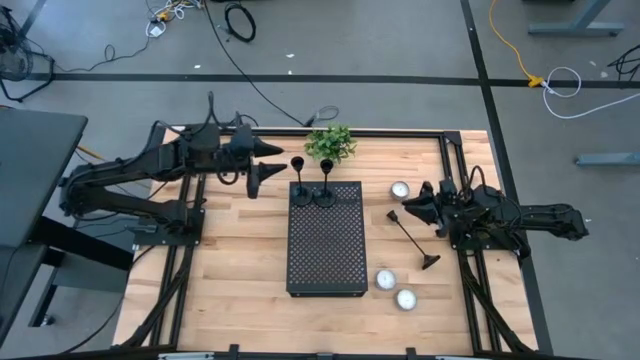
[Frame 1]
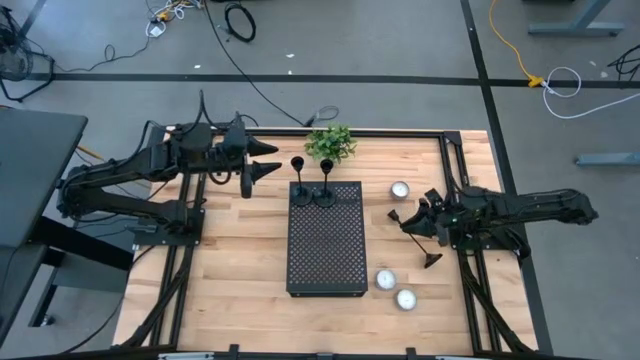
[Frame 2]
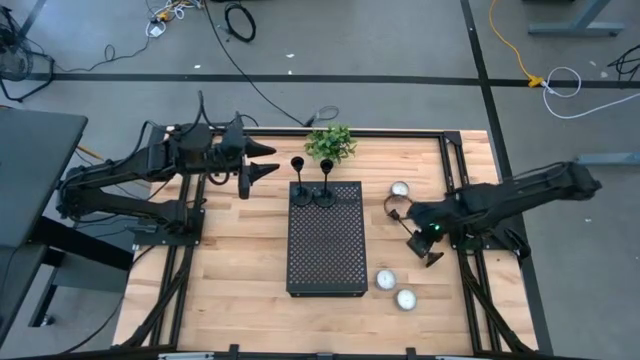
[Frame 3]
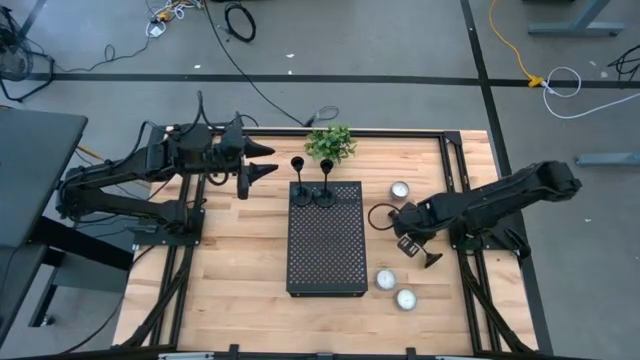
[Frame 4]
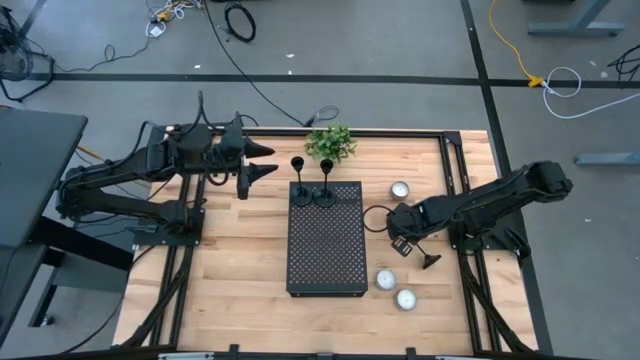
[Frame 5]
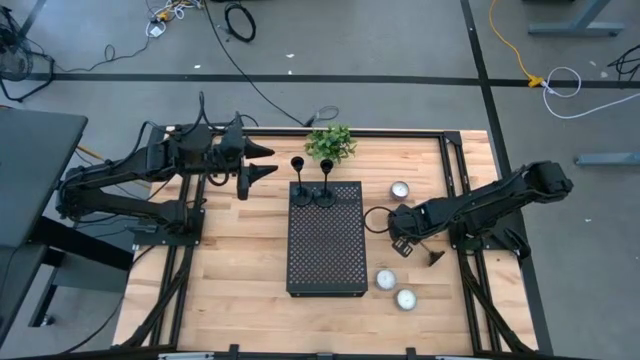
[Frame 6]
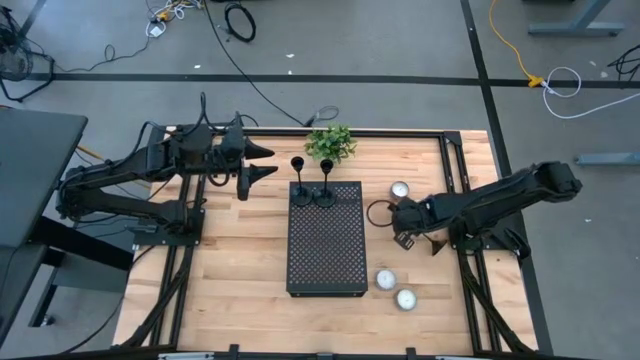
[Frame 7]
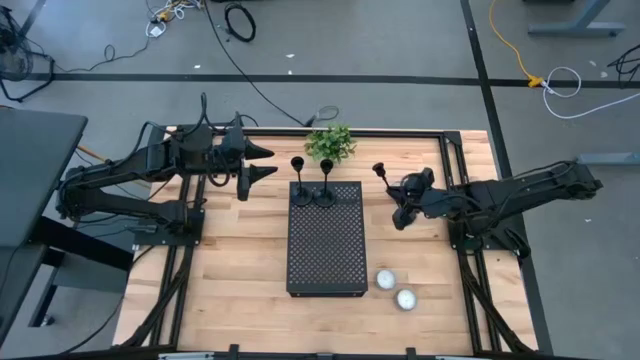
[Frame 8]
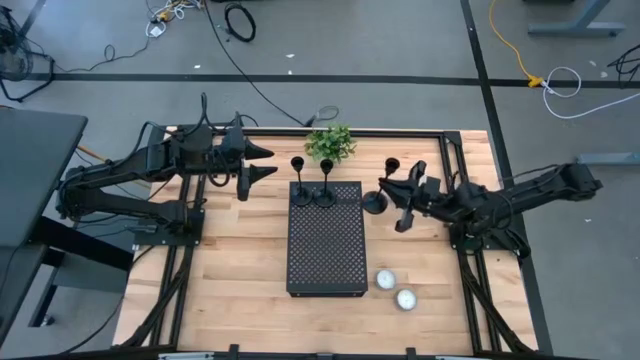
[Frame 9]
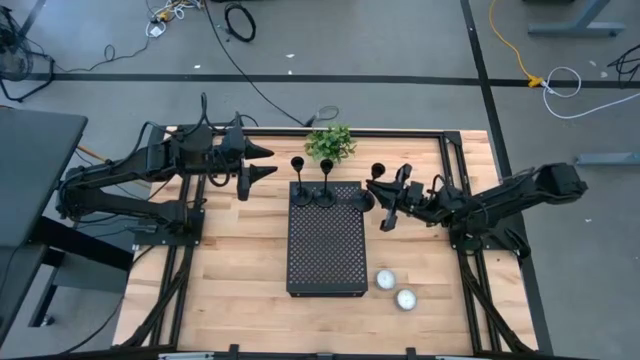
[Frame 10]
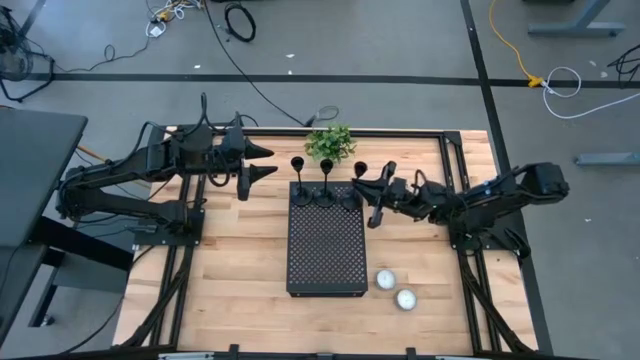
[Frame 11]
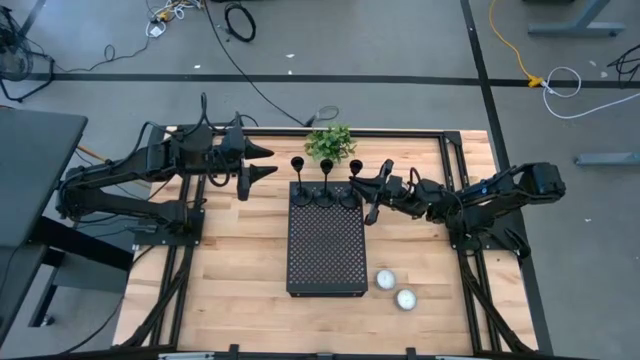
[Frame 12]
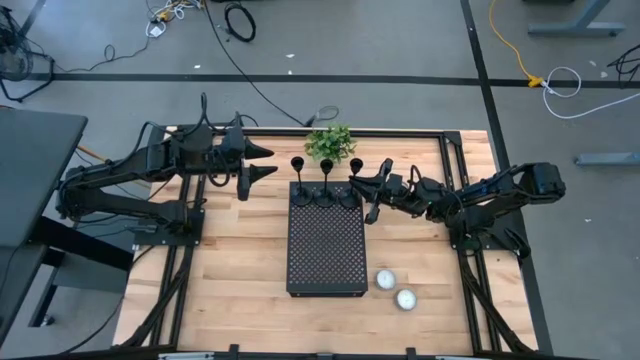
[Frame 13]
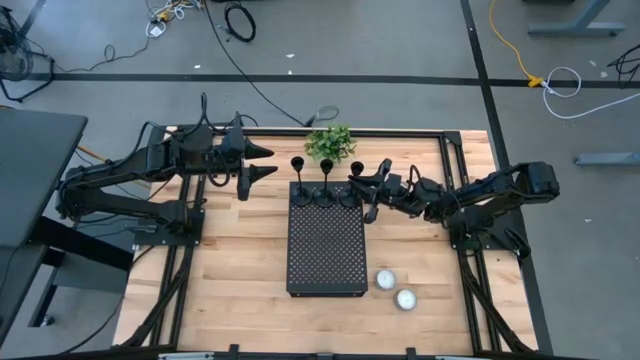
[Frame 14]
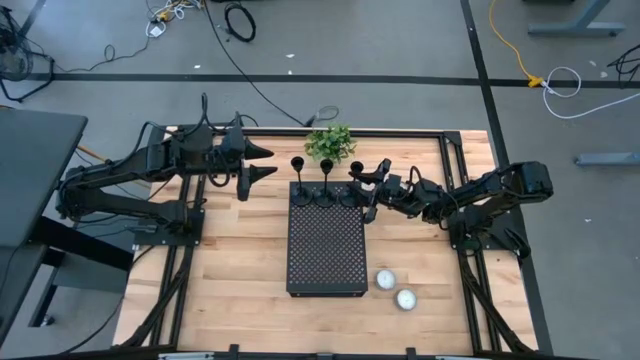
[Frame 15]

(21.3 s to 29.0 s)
Task: Pick & Place candle stick holders
Put the black candle holder on the shelf

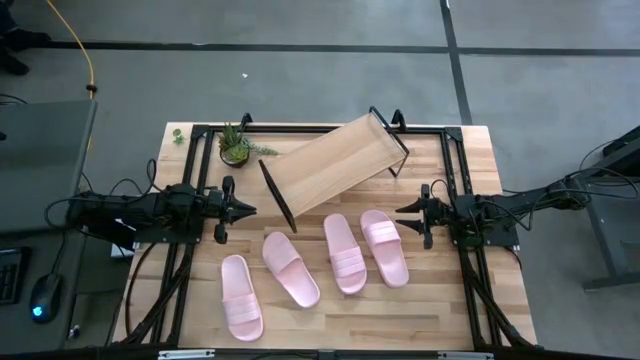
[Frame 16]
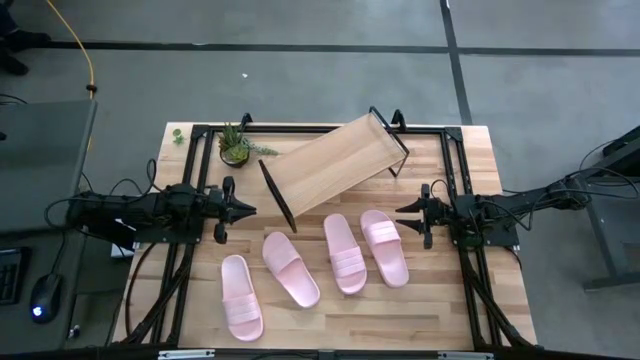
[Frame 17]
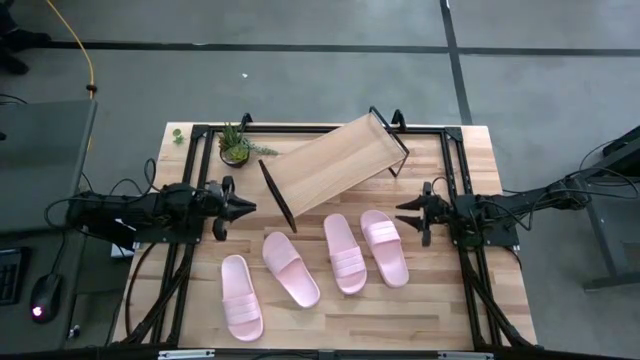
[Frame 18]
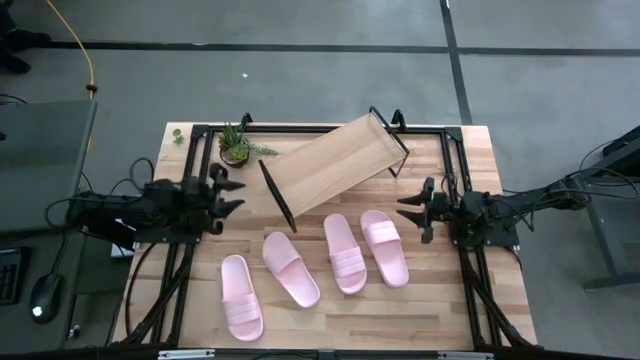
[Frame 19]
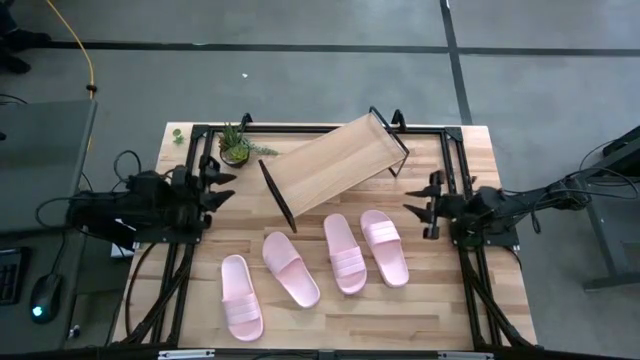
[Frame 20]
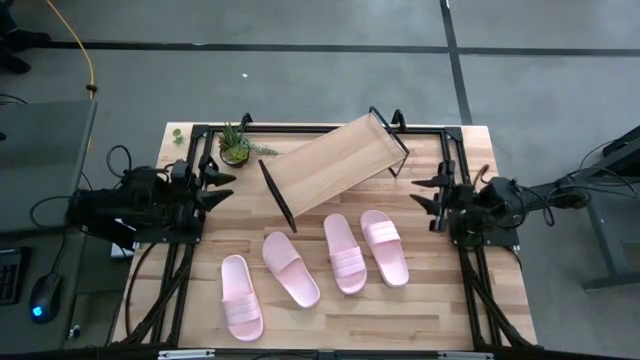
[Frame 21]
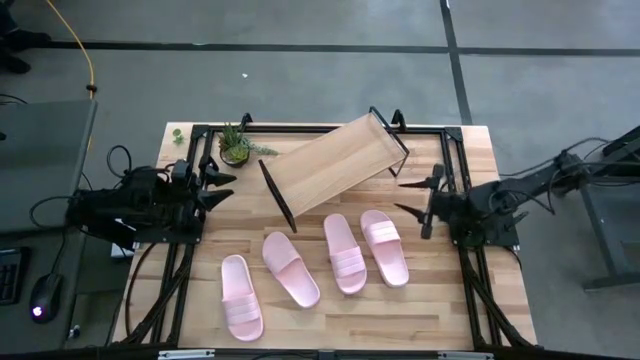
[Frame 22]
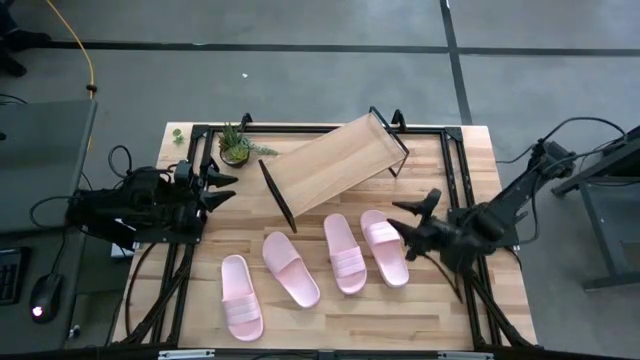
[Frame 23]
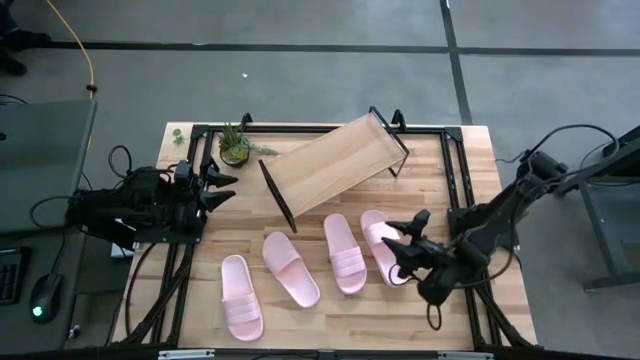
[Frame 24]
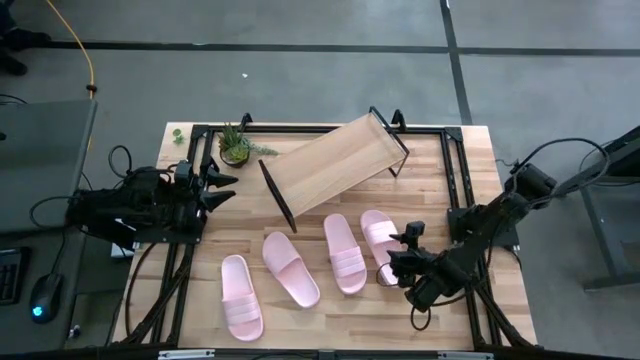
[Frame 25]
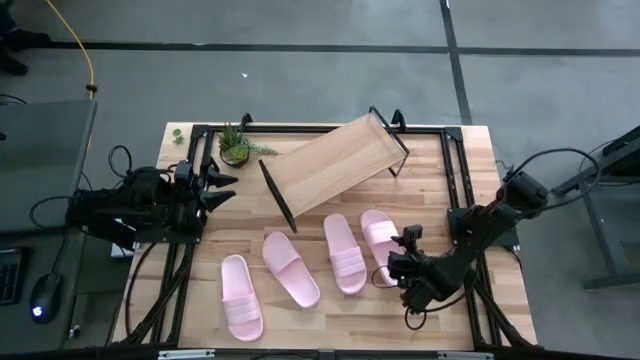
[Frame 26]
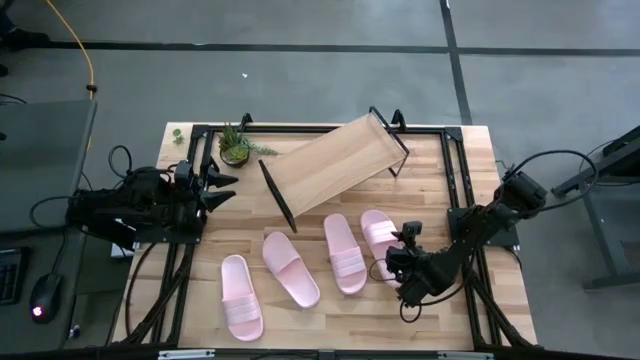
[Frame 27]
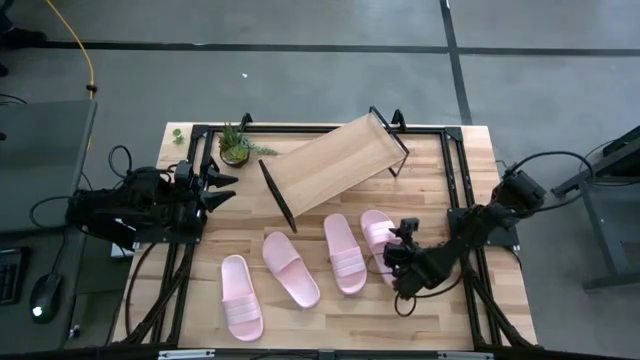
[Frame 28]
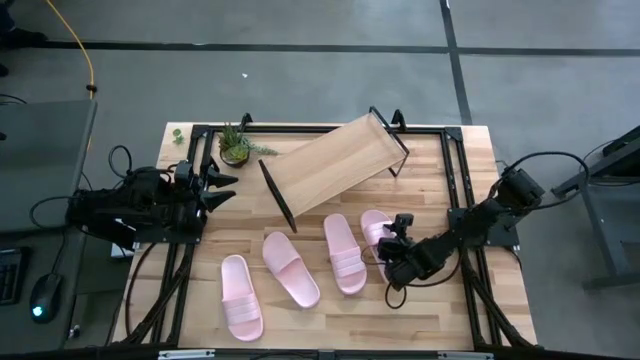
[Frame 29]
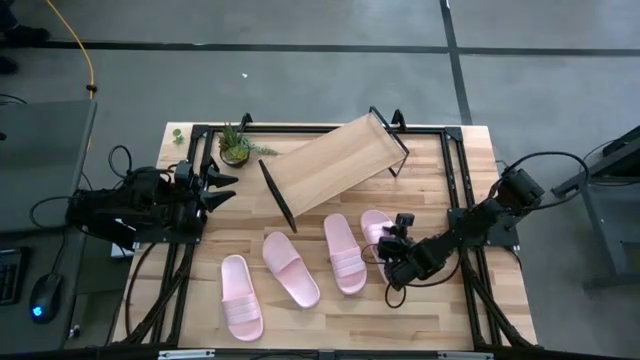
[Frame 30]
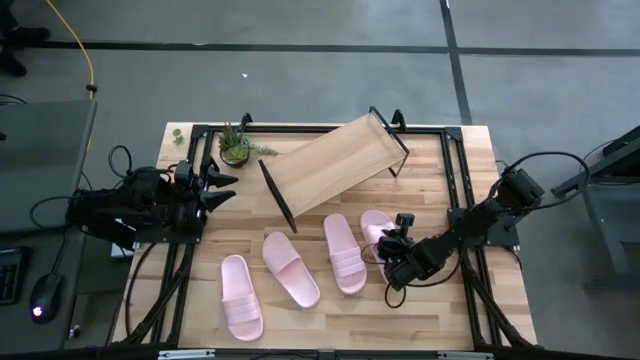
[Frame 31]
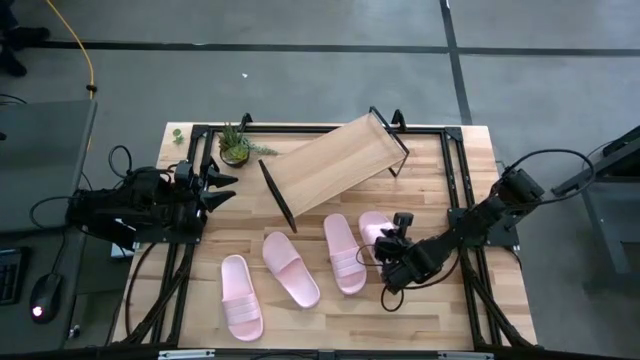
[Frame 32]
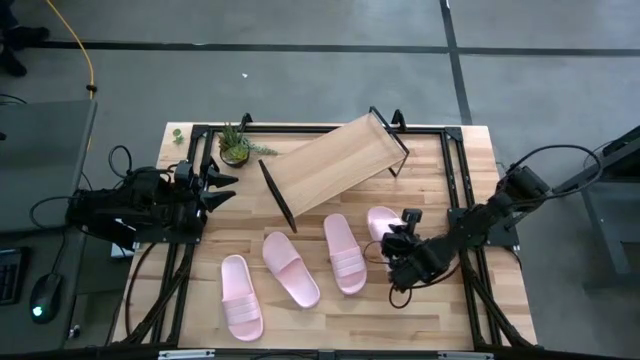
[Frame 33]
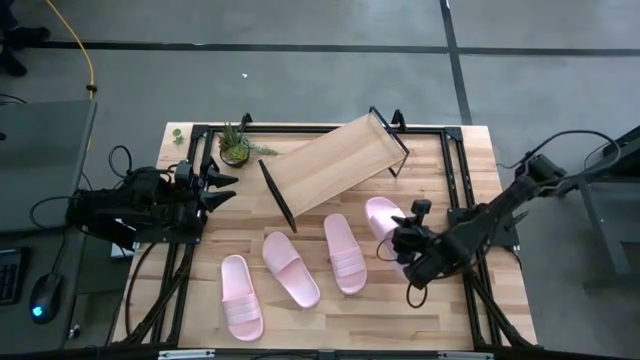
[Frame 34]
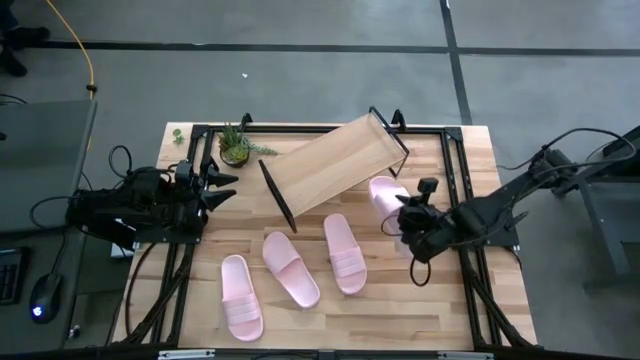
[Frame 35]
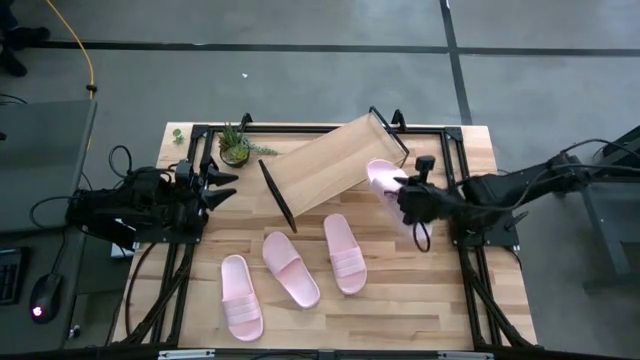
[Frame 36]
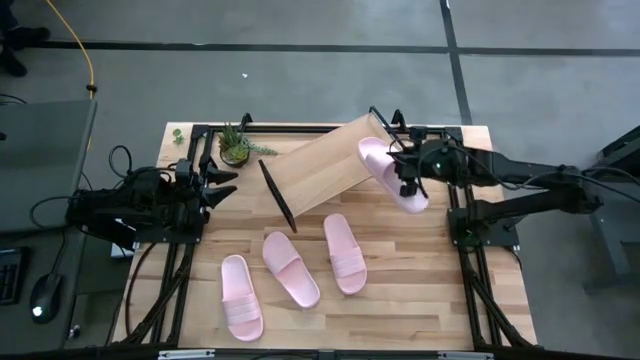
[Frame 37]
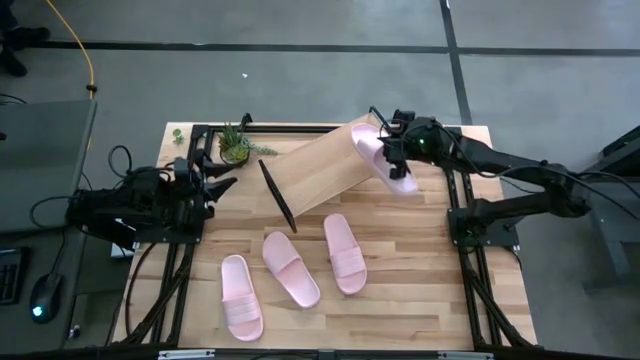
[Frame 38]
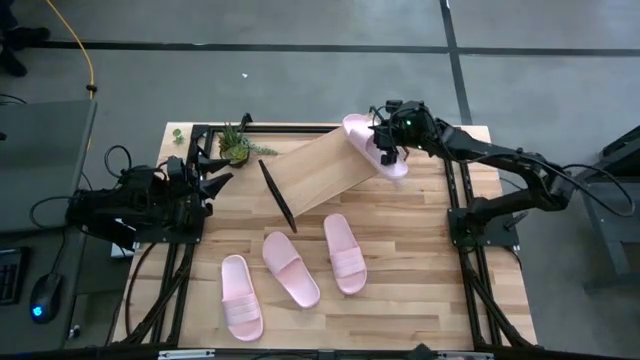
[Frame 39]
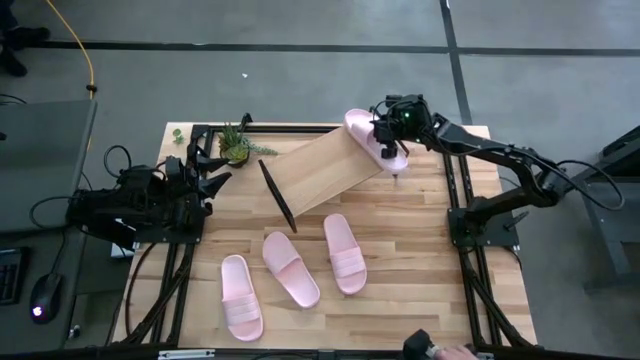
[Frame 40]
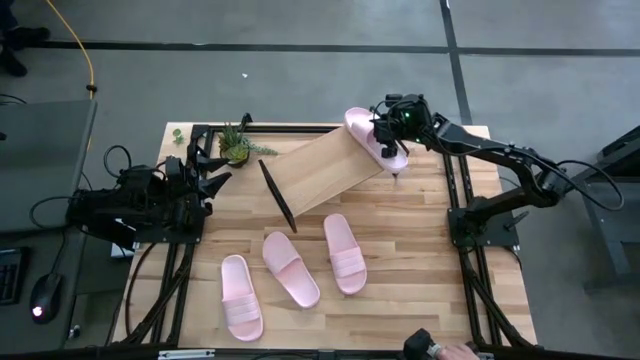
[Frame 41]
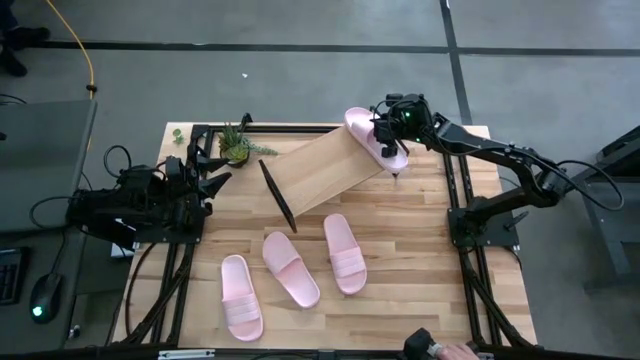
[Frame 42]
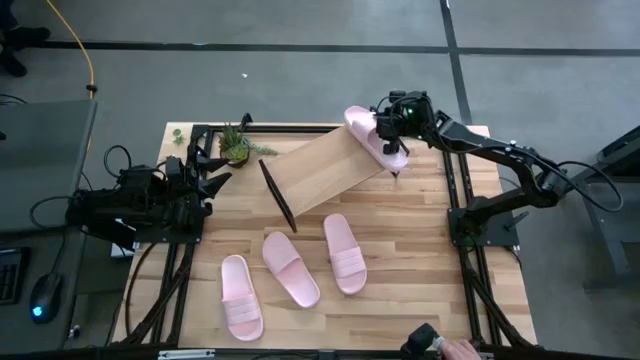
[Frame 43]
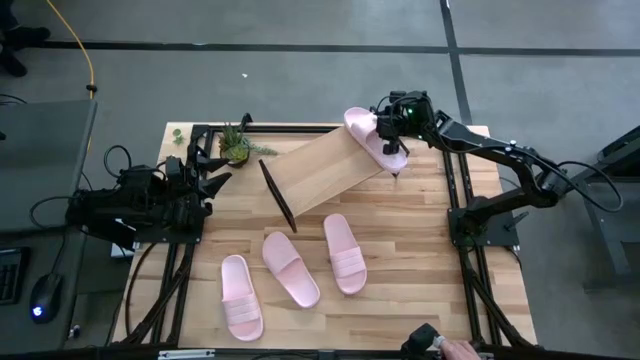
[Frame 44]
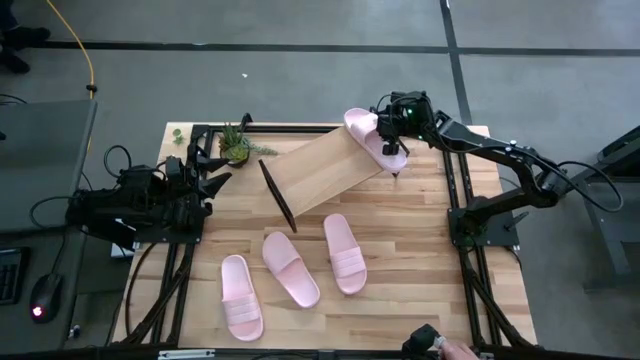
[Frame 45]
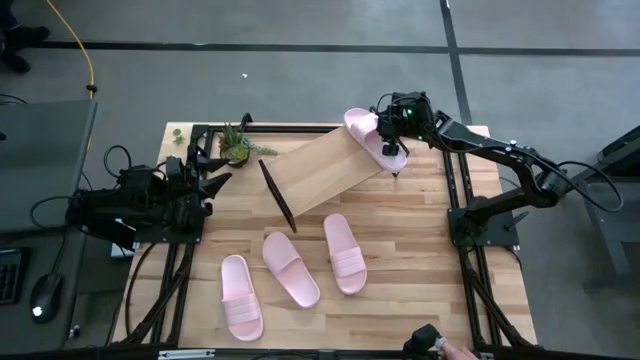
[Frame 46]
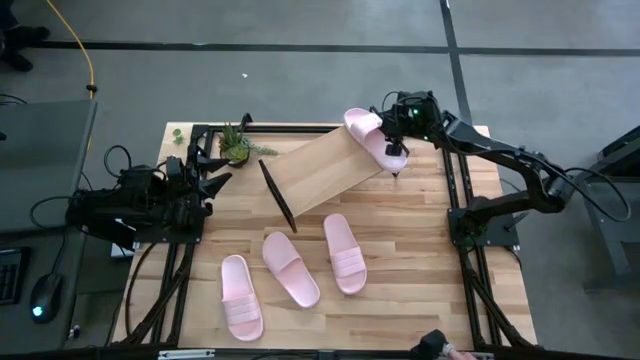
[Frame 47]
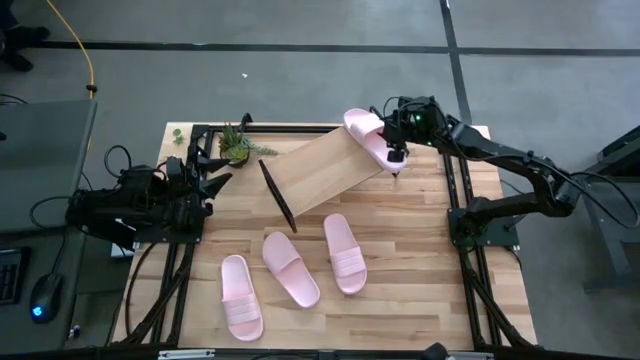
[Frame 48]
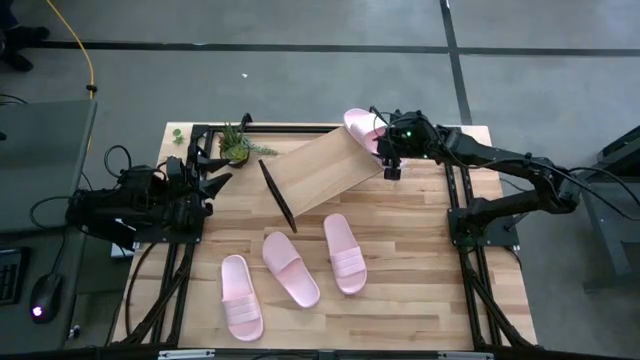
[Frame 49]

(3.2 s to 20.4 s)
Task: Pick and place slides into the shelf
Put the right pink slide on the shelf
